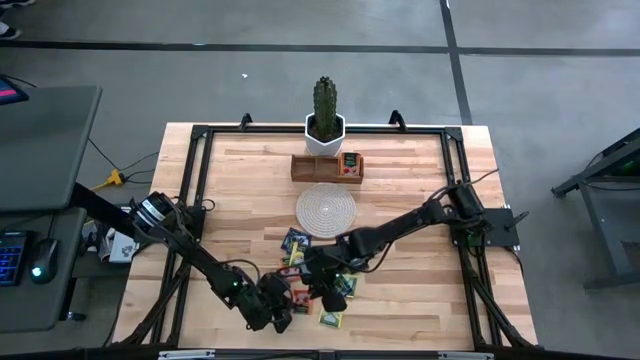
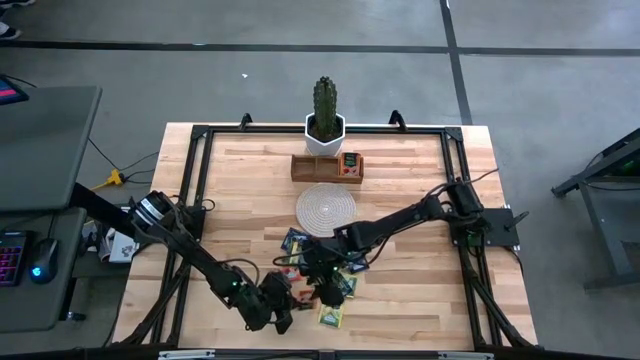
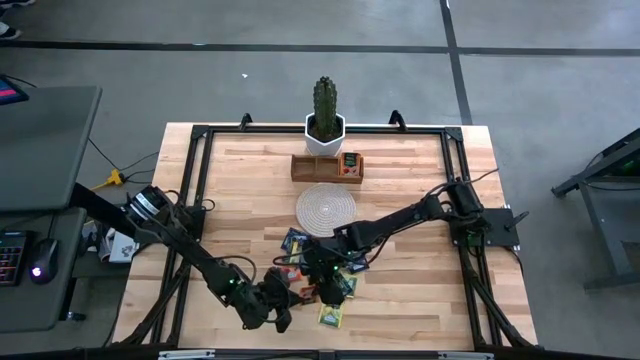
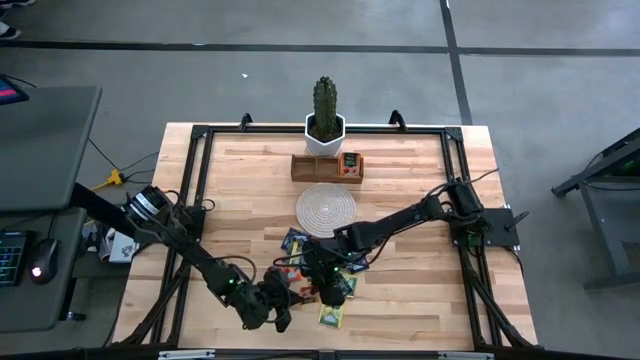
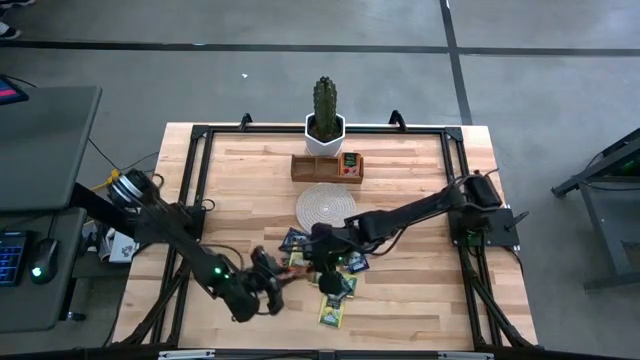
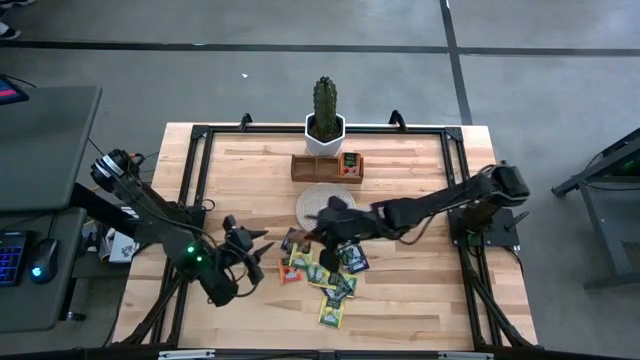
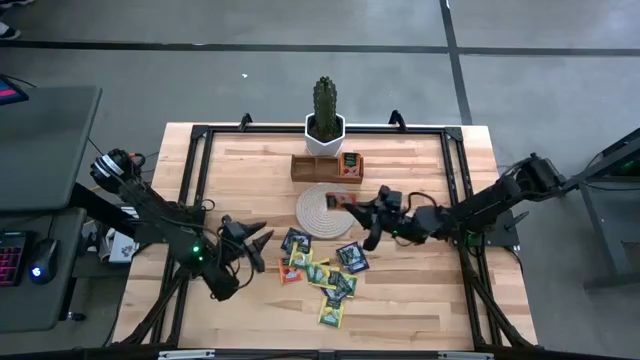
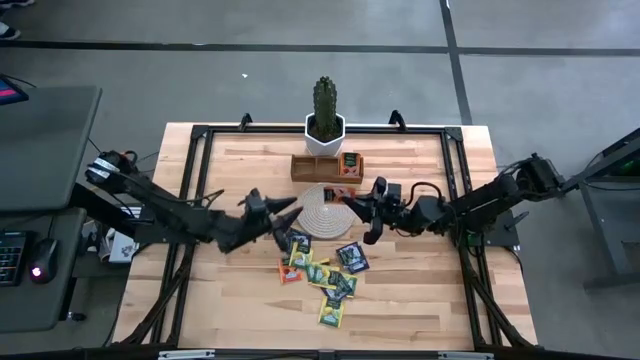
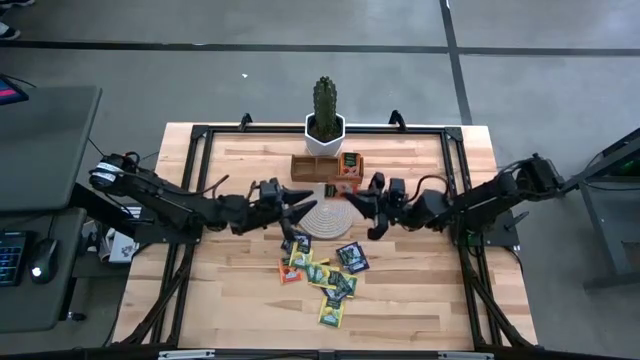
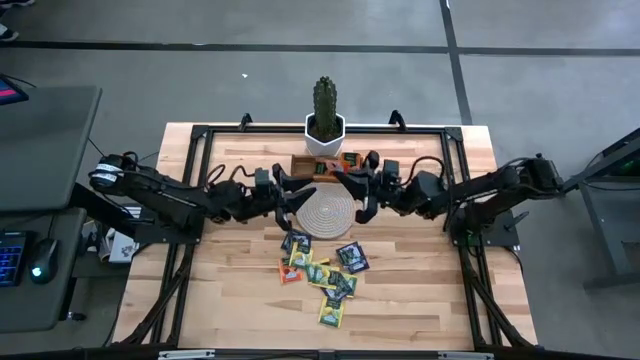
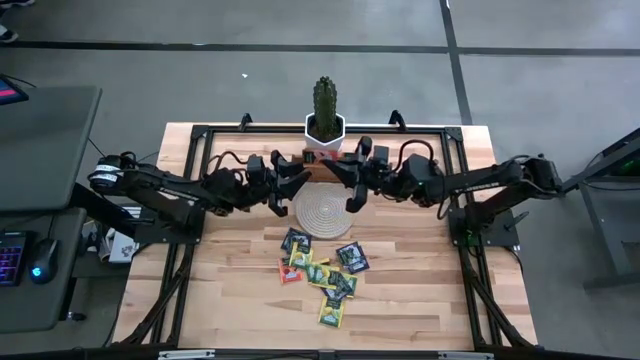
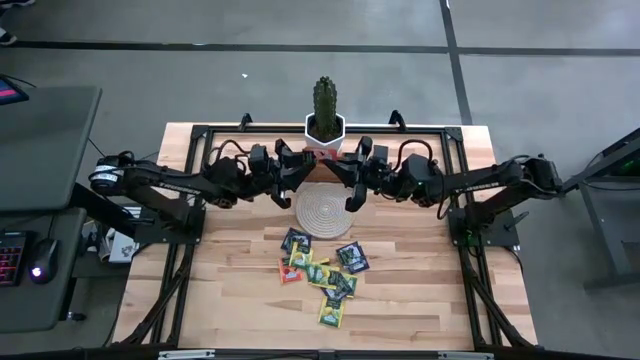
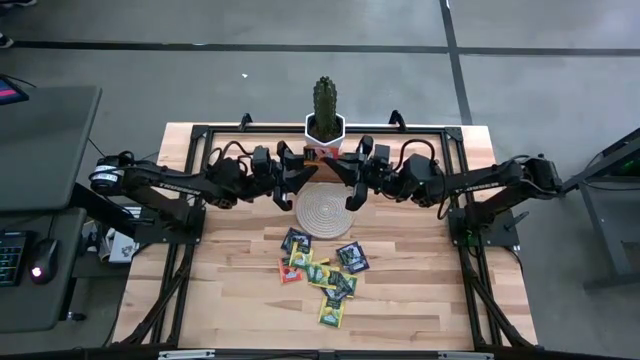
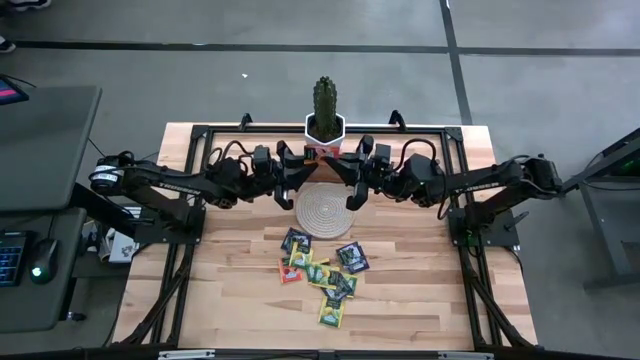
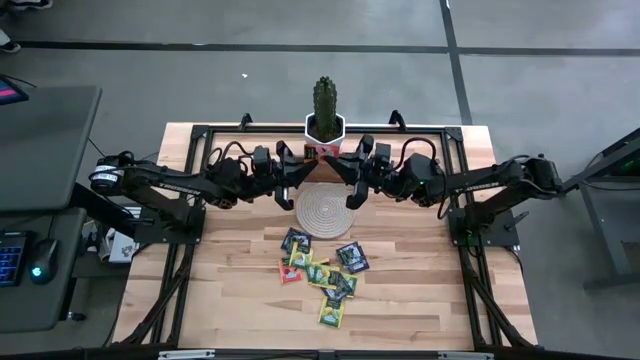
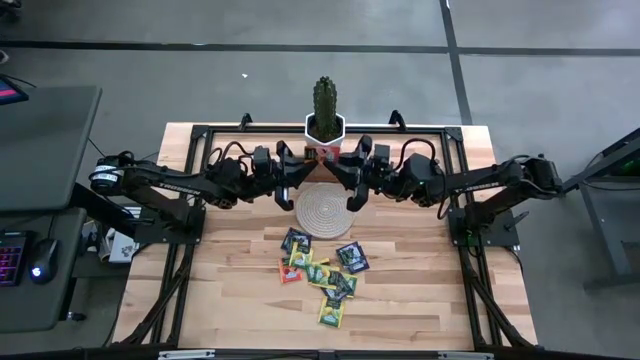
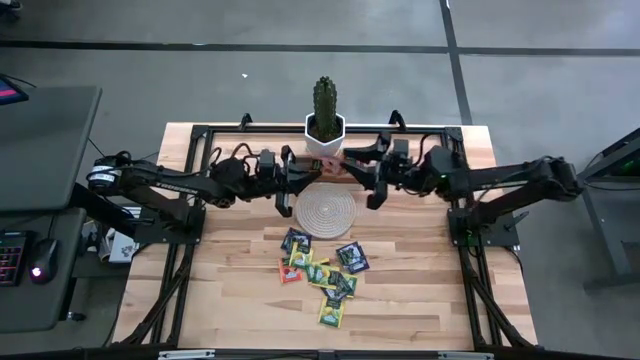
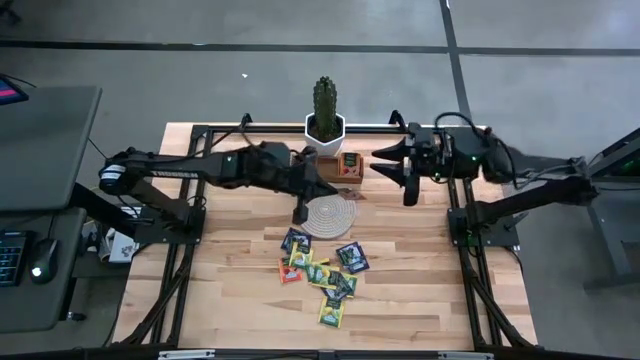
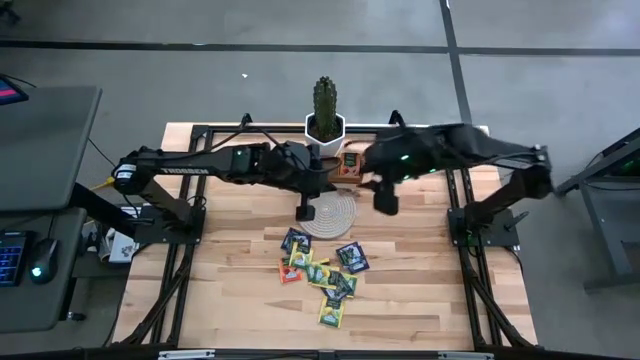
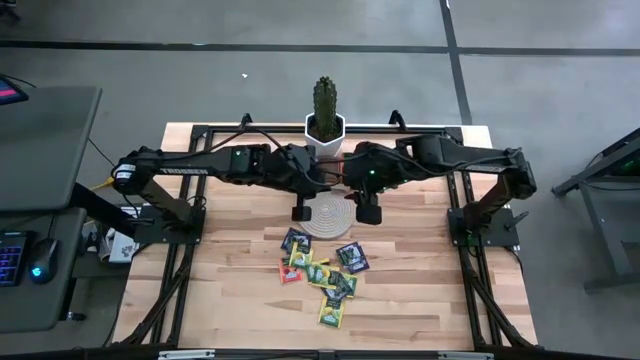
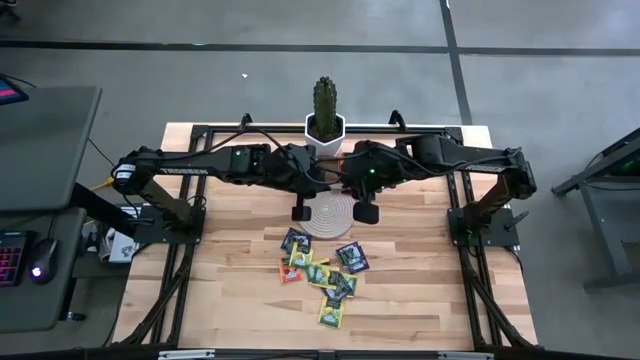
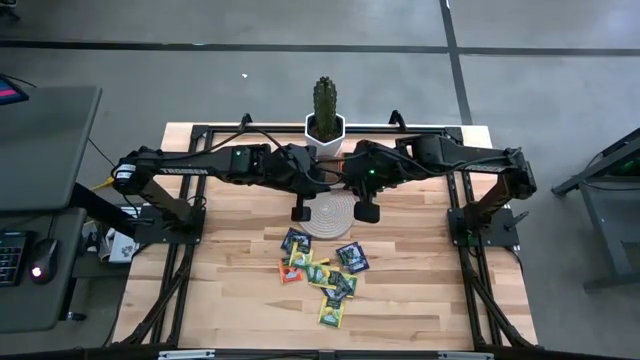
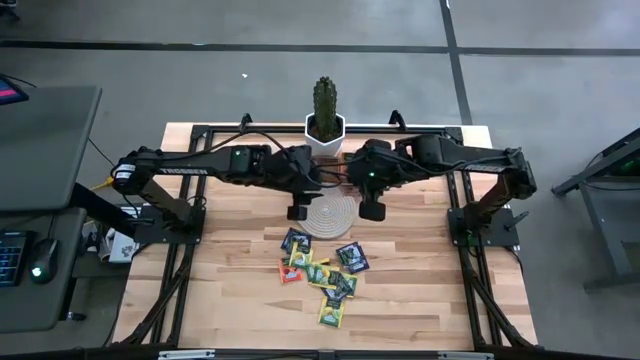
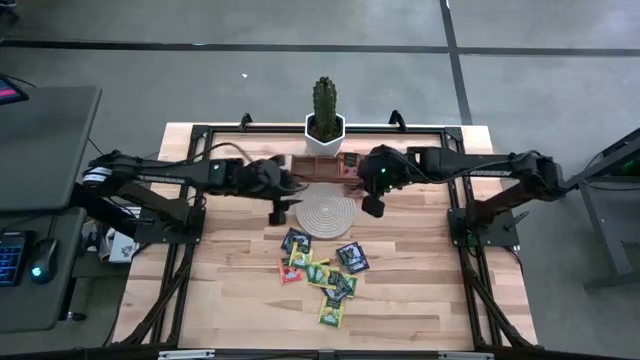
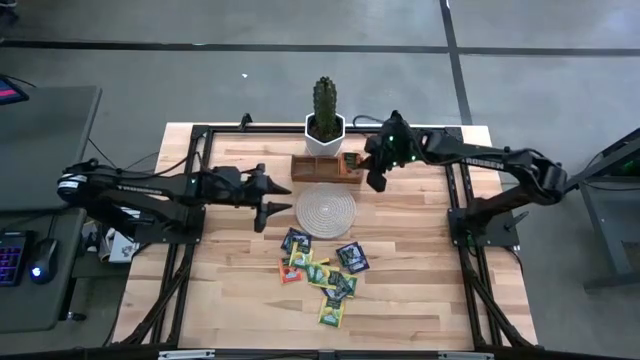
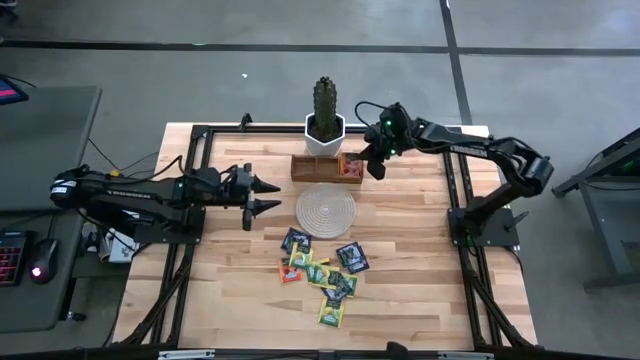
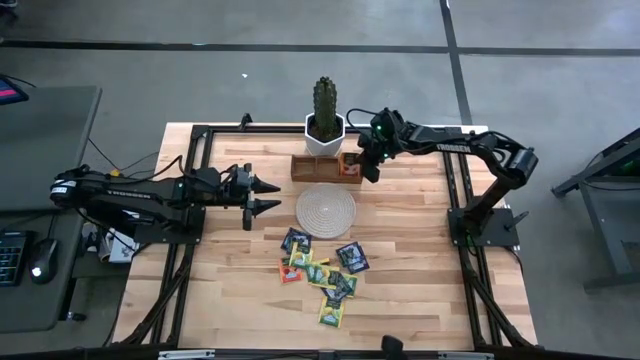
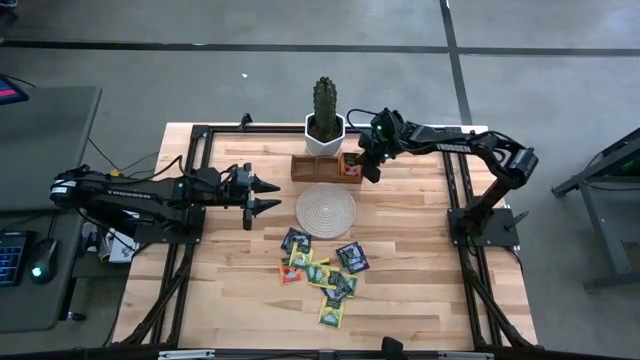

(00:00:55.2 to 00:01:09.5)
Task: Pick & Place Tea
Put the orange tea bag into the right section of the wooden organizer

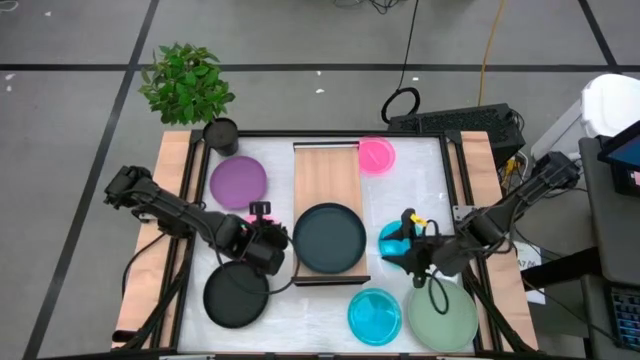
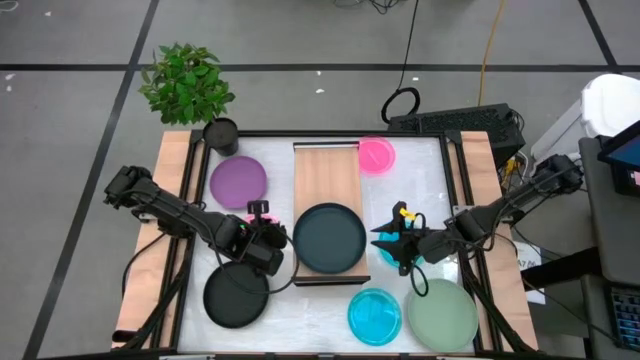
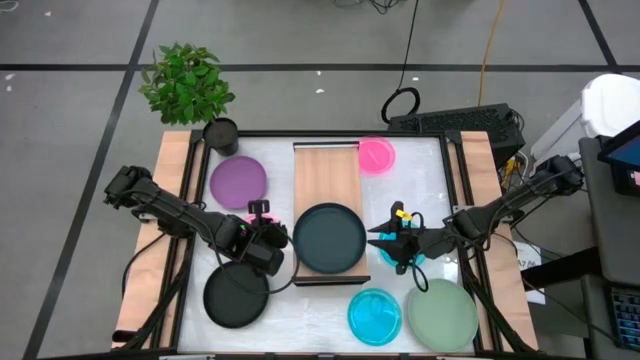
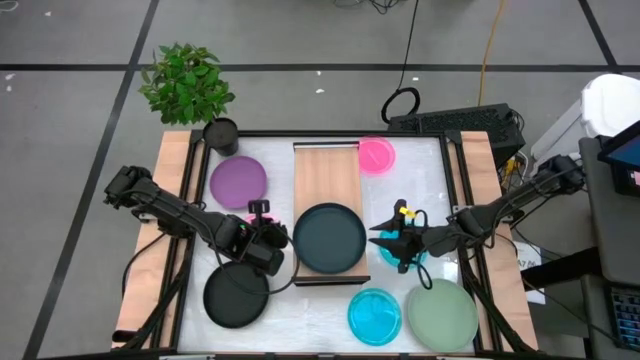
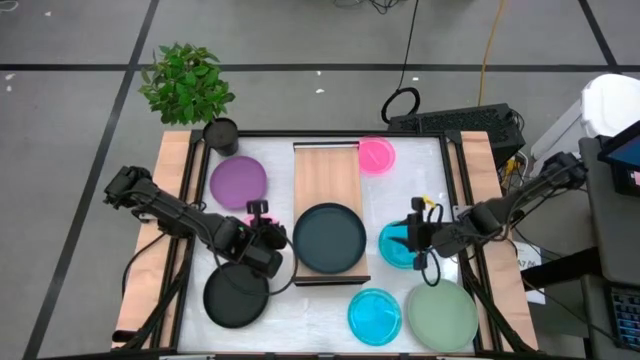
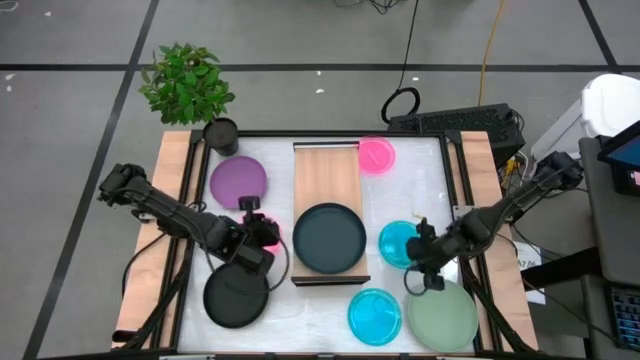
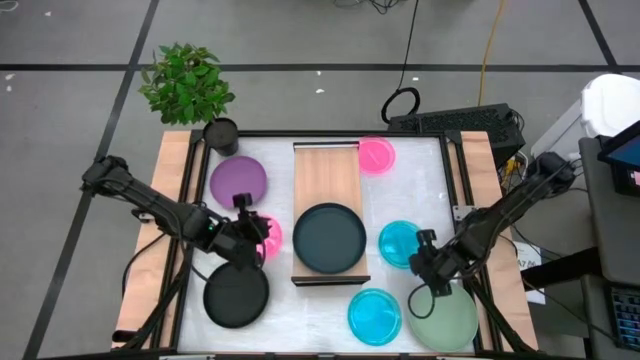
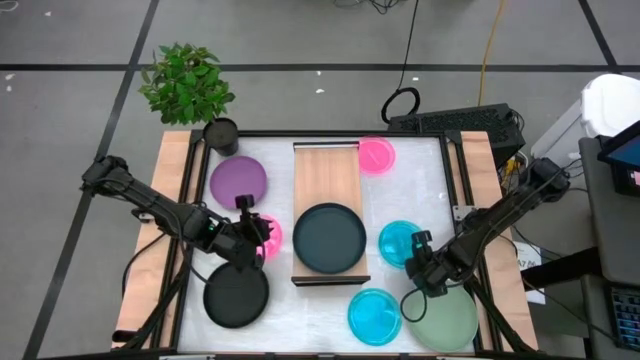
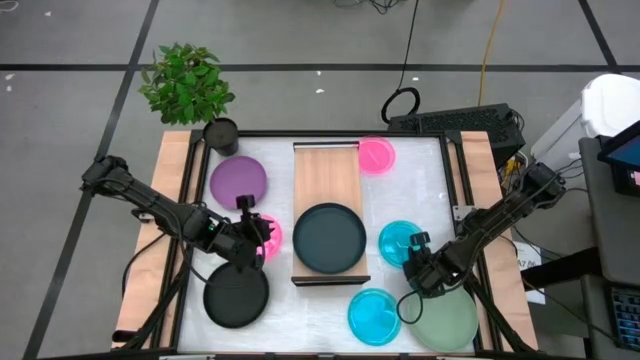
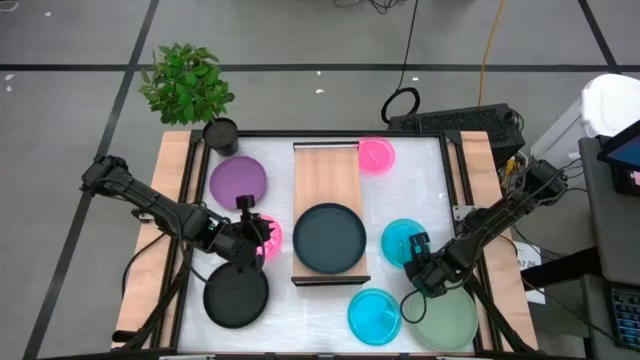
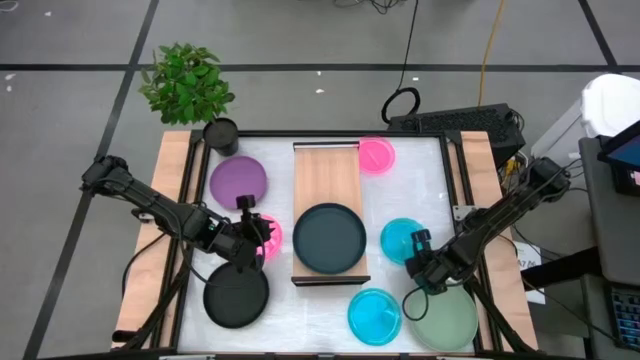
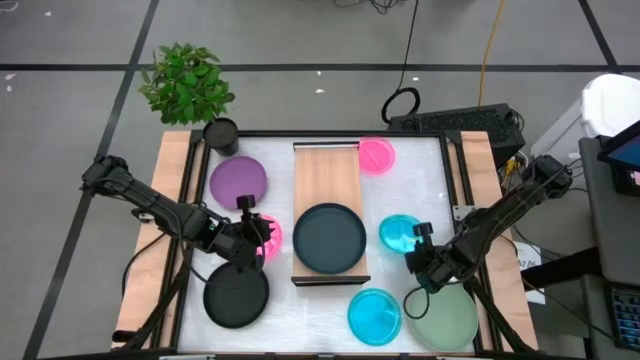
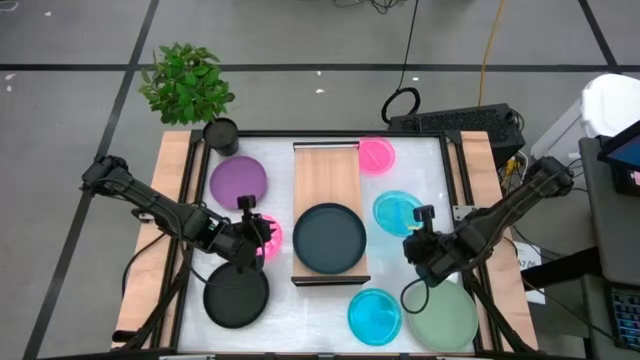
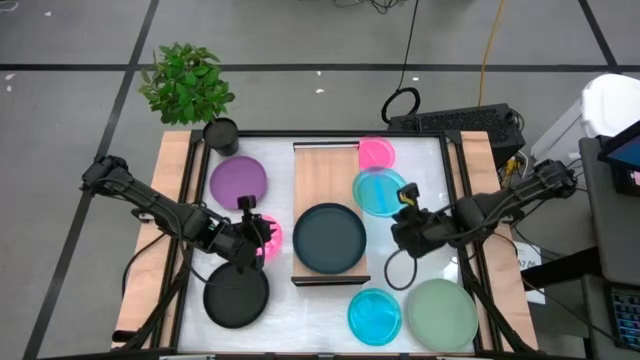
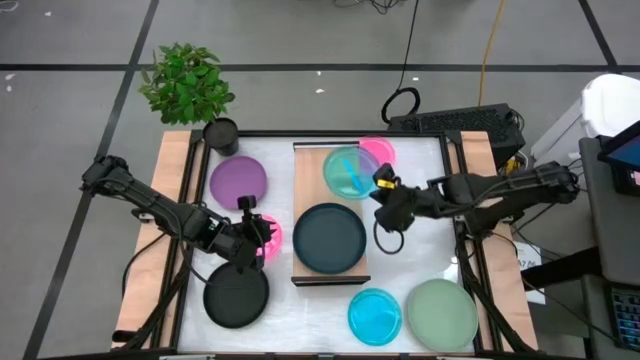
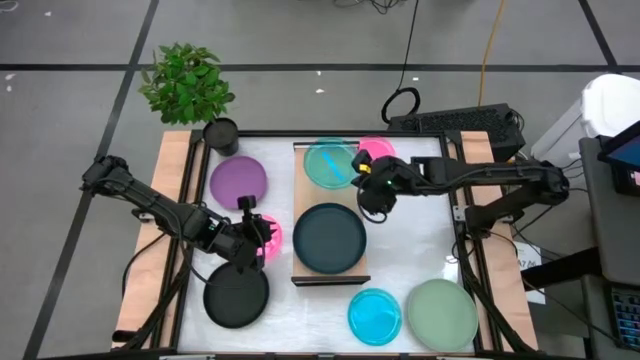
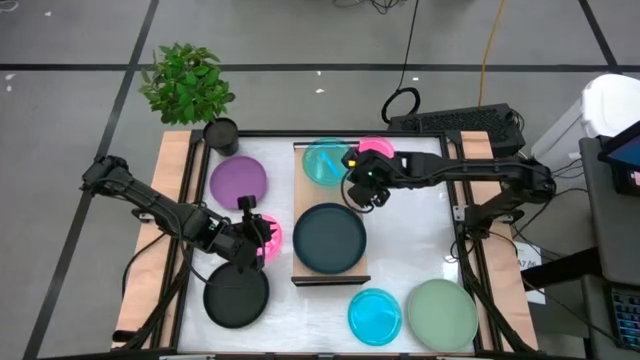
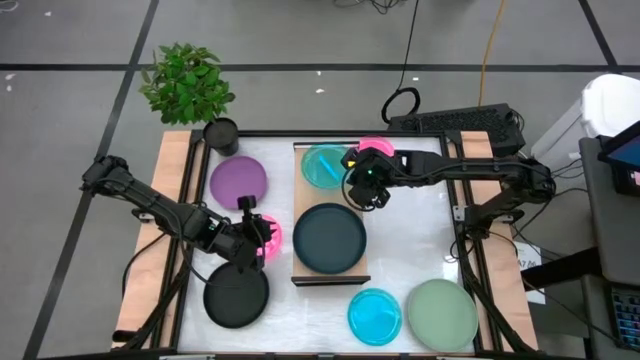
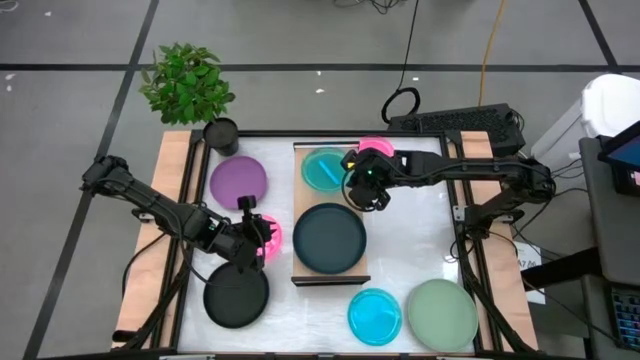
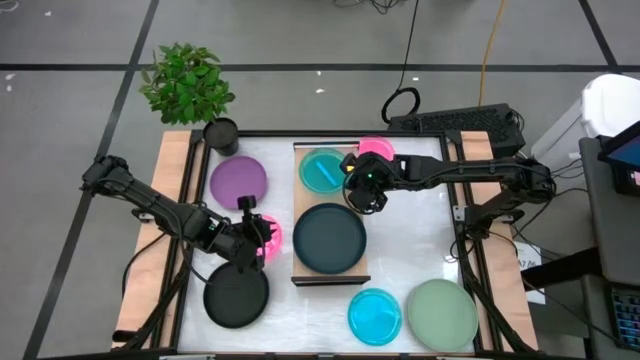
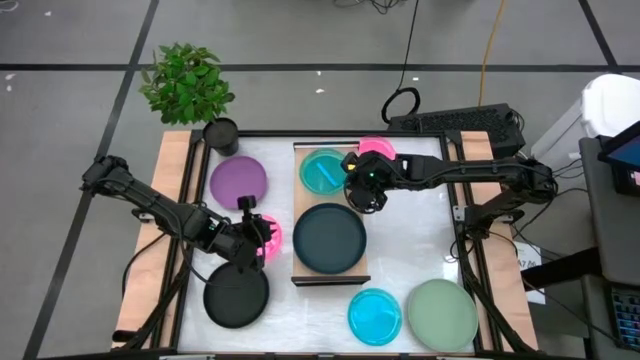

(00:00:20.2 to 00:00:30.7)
Task: Place and stack plates onto a shelf
Put the top blue plate on the shelf
